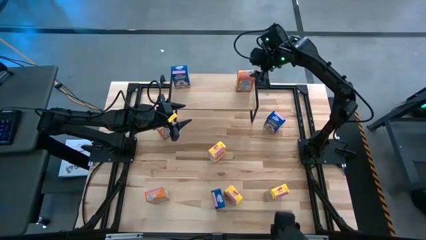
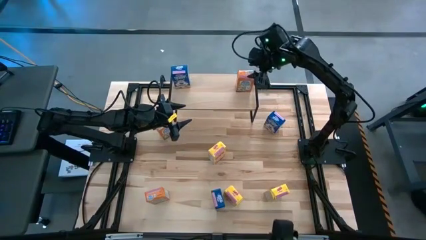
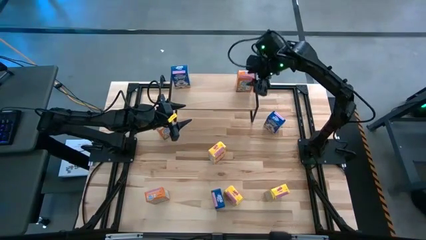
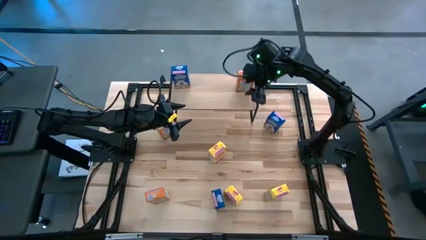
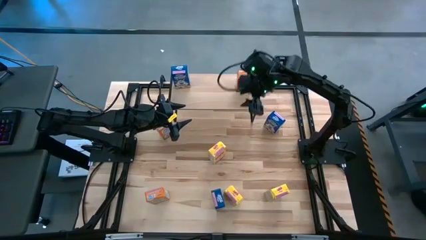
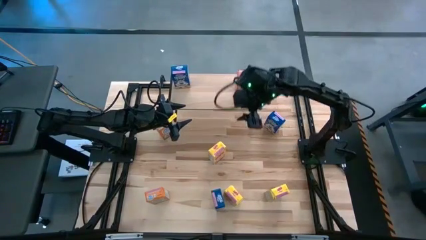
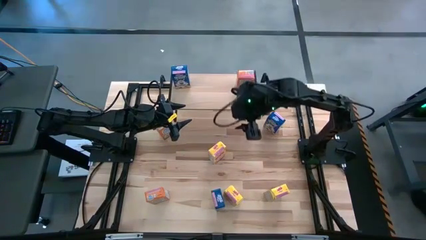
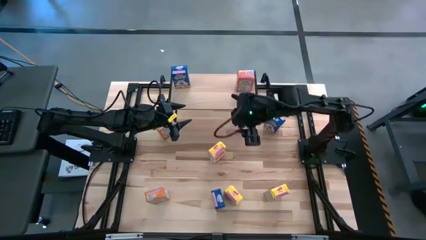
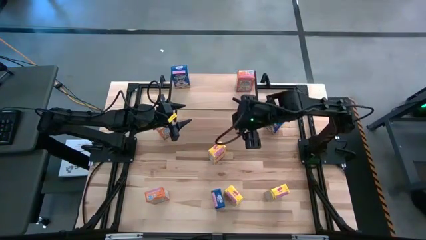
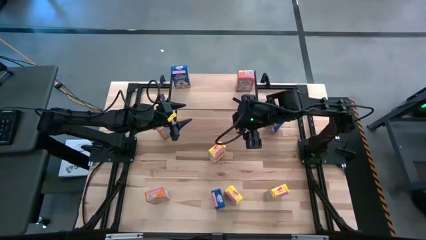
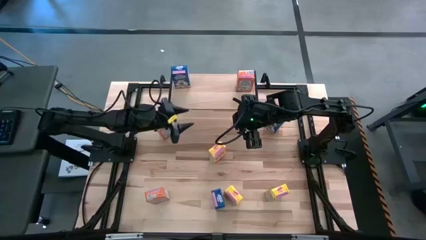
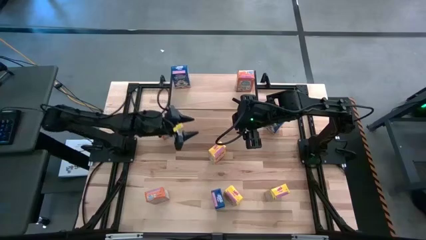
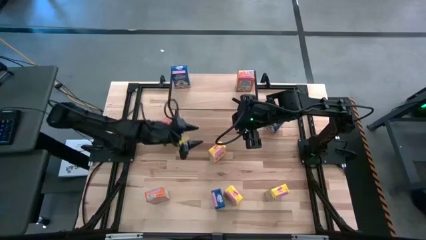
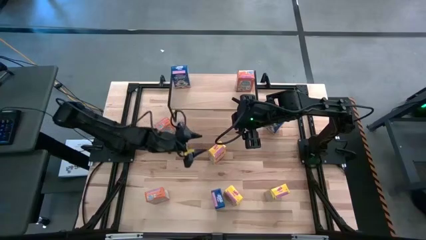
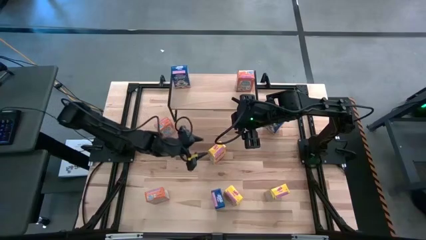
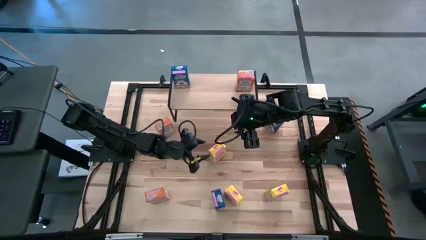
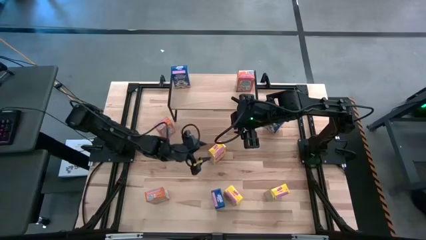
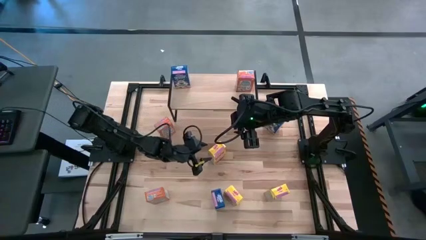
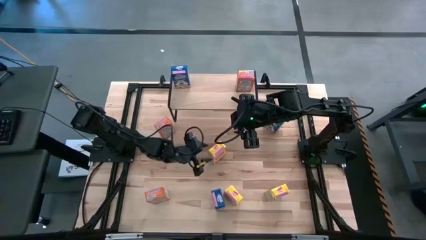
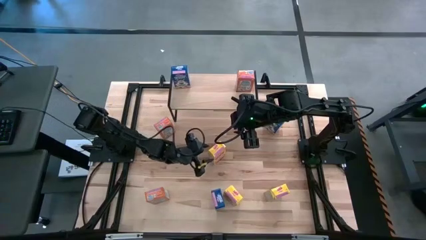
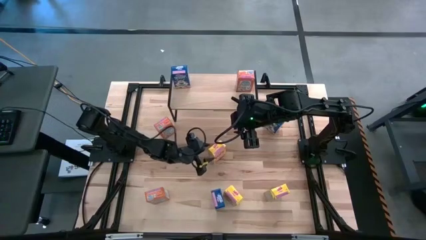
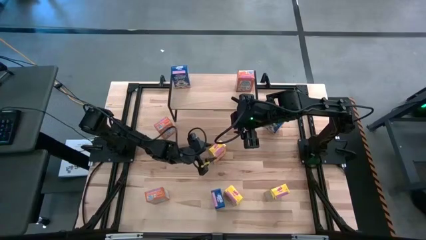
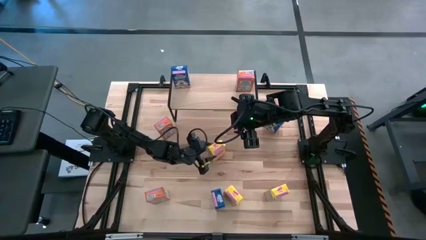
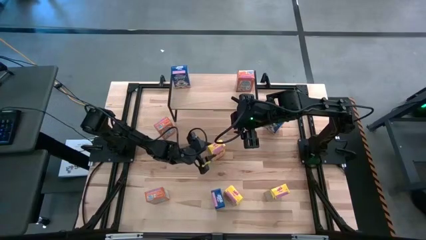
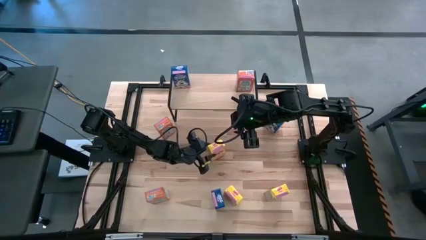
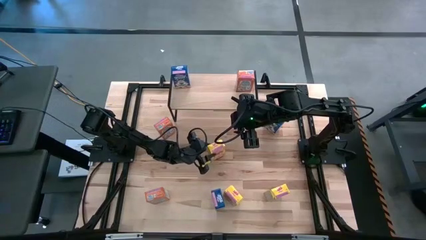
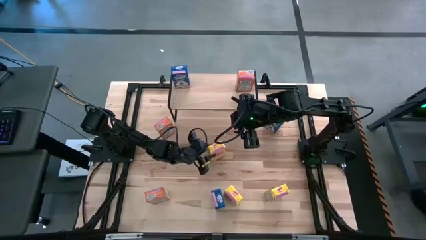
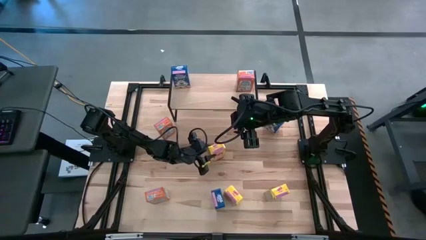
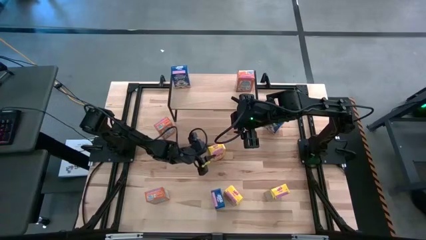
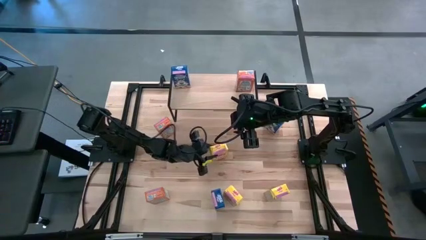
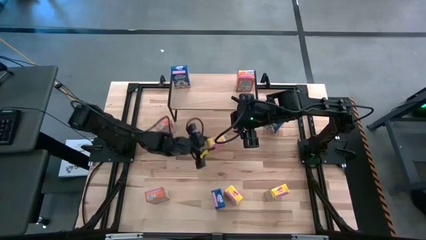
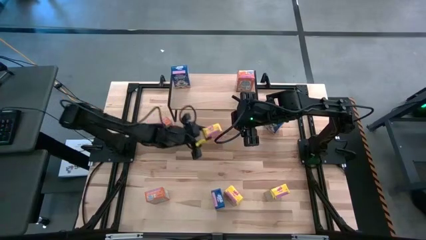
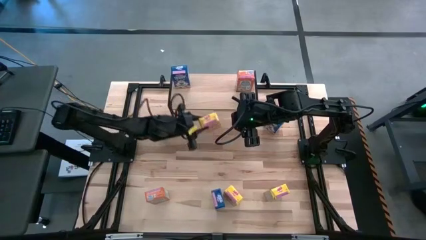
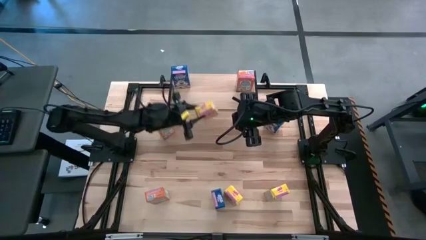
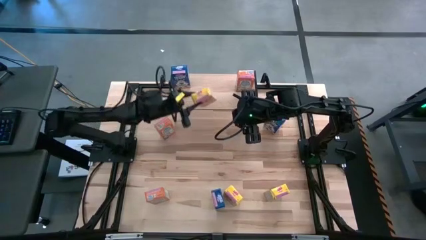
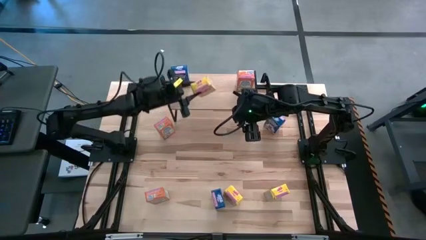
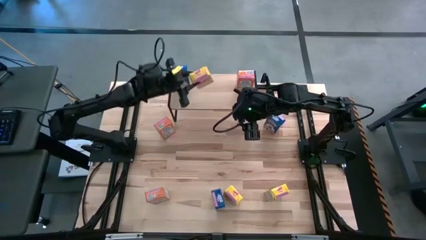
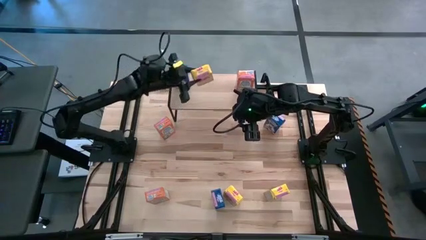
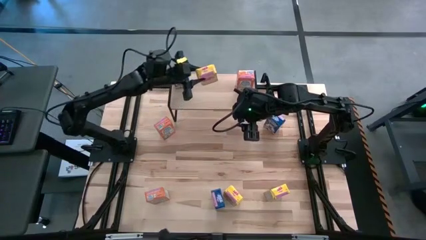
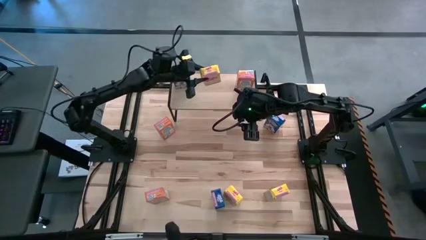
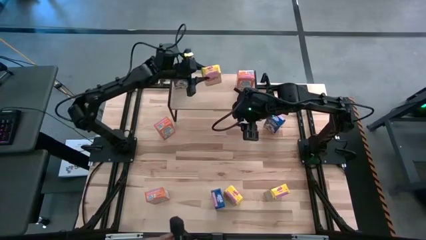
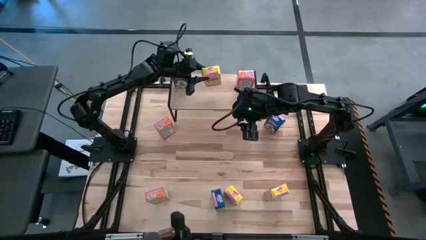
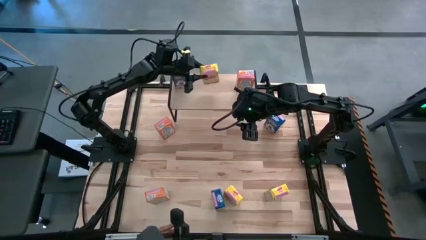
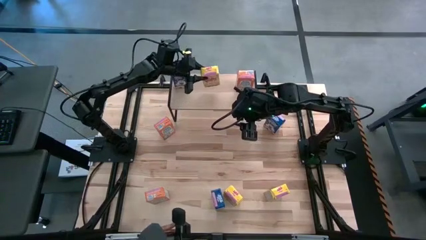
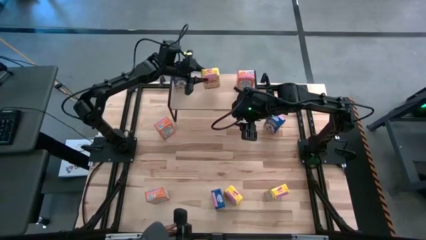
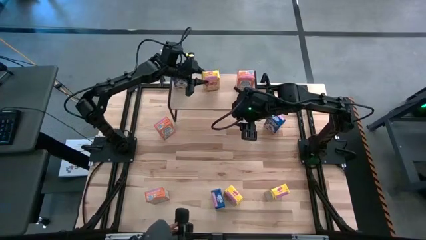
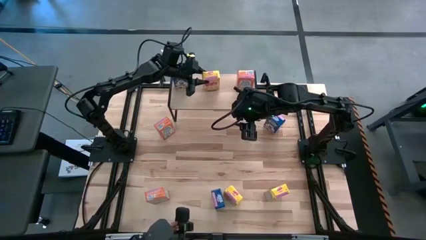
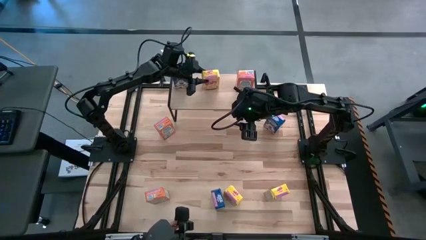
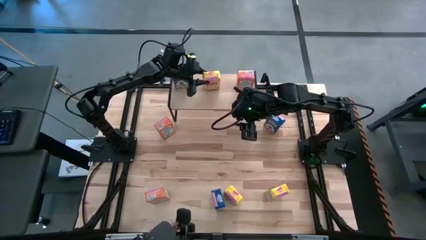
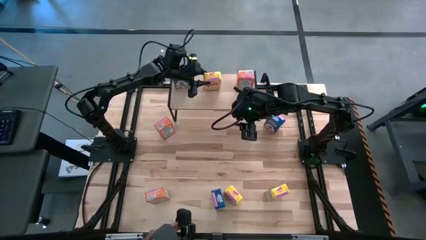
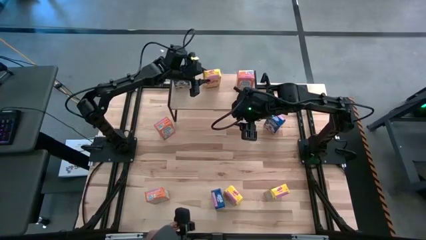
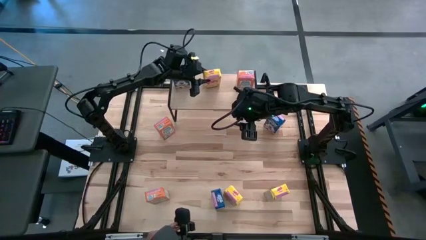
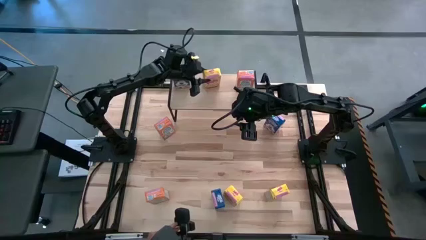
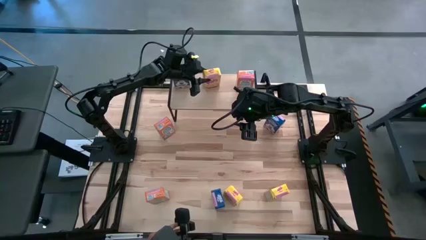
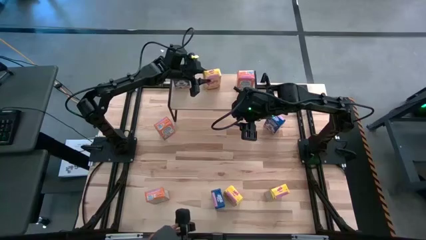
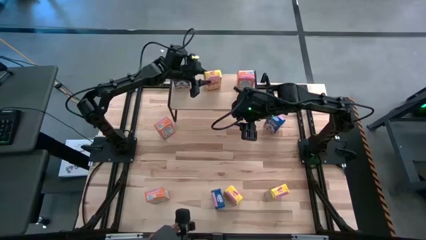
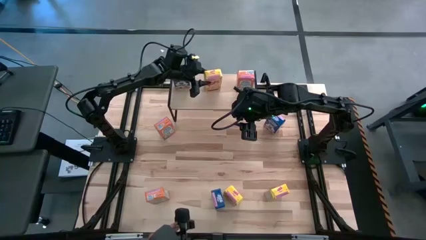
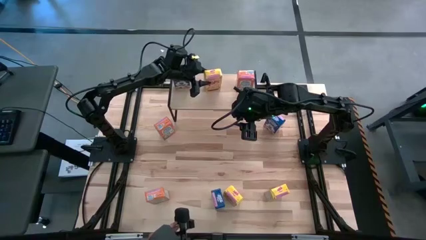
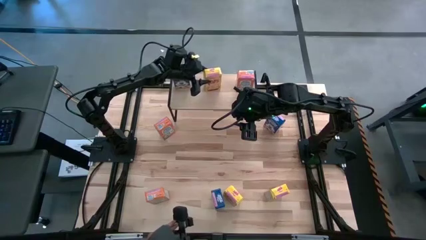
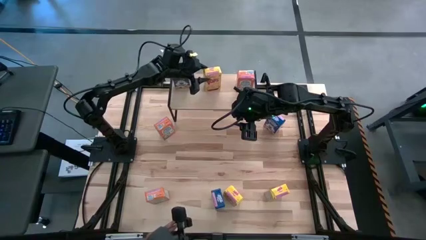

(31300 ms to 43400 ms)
Task: Stack cereal on shelf
Put the top left yellow cereal box on the shelf
